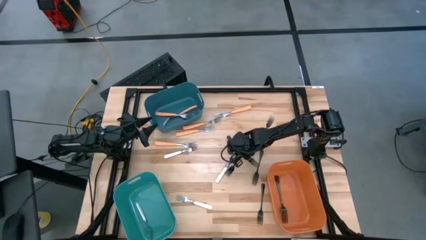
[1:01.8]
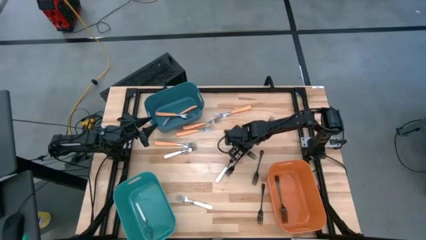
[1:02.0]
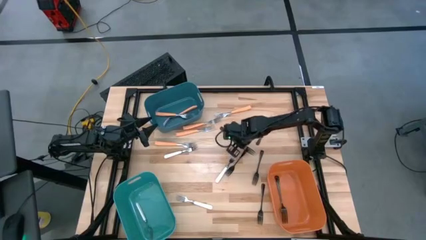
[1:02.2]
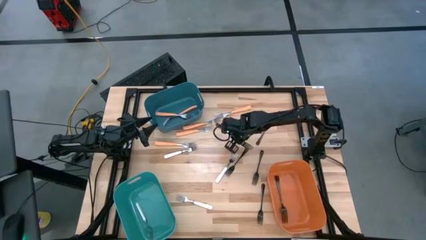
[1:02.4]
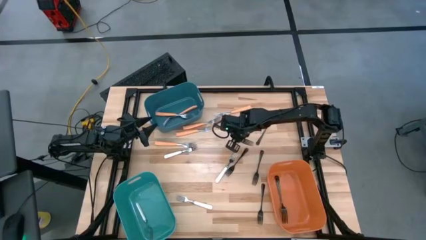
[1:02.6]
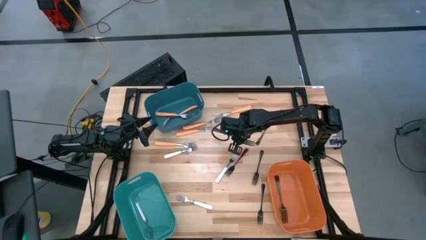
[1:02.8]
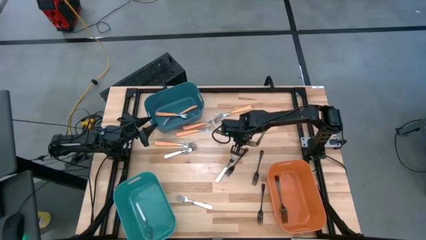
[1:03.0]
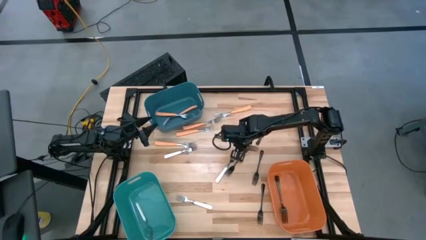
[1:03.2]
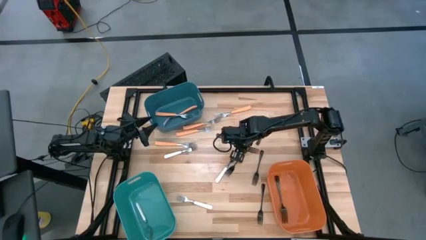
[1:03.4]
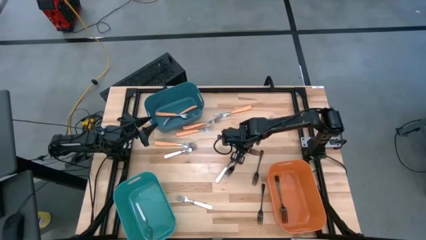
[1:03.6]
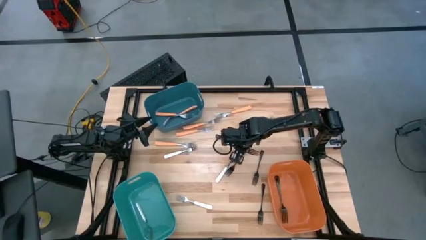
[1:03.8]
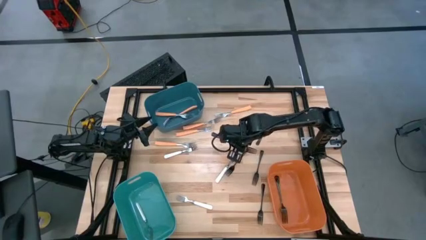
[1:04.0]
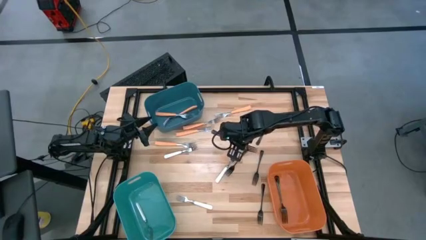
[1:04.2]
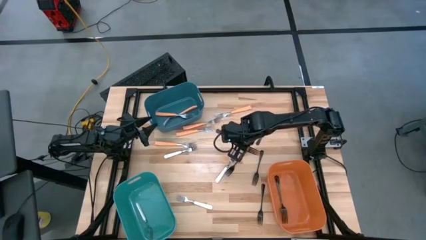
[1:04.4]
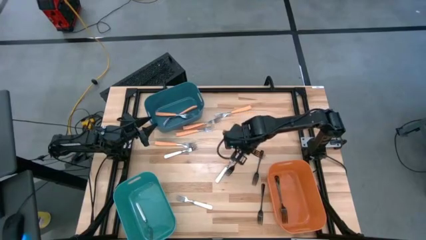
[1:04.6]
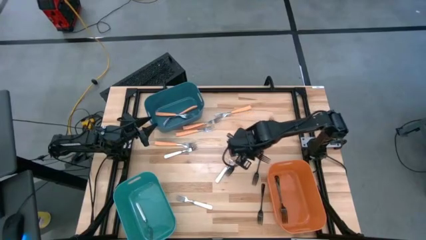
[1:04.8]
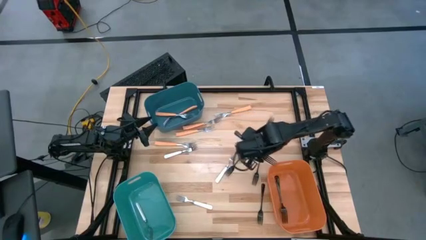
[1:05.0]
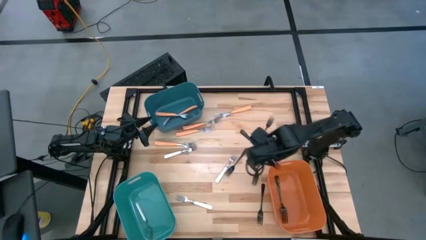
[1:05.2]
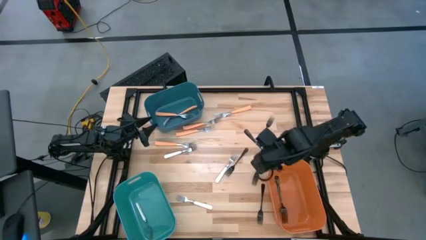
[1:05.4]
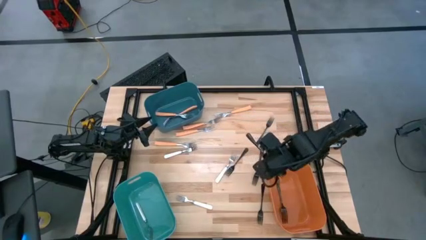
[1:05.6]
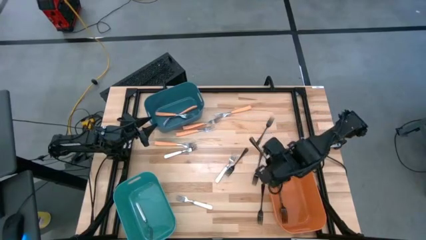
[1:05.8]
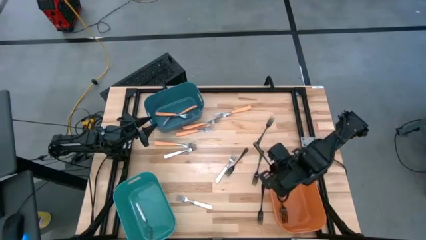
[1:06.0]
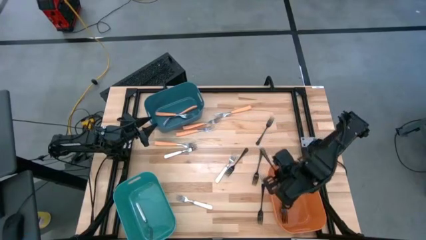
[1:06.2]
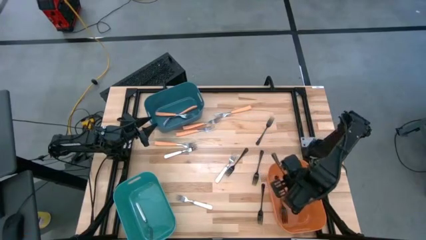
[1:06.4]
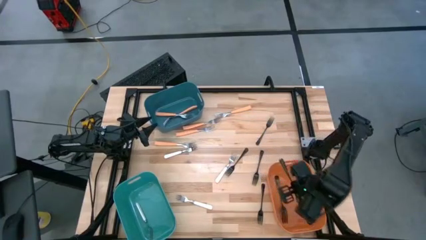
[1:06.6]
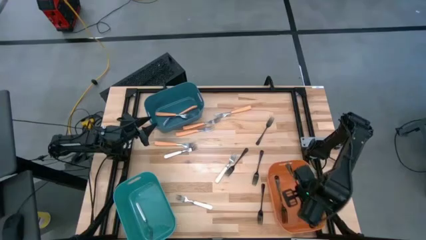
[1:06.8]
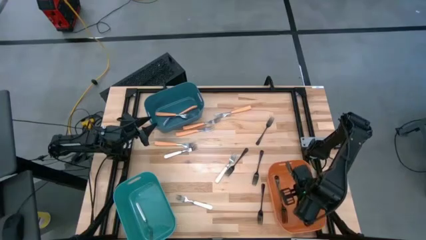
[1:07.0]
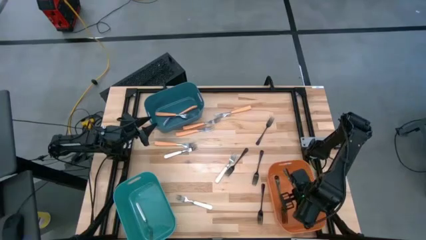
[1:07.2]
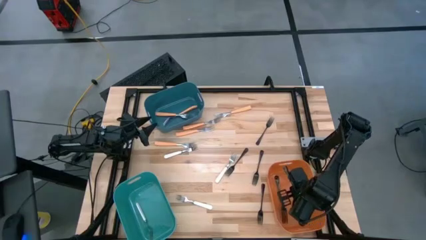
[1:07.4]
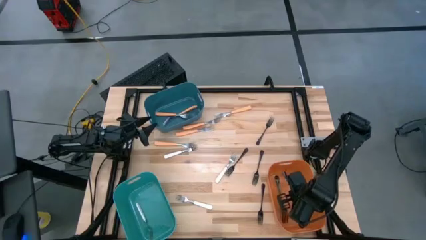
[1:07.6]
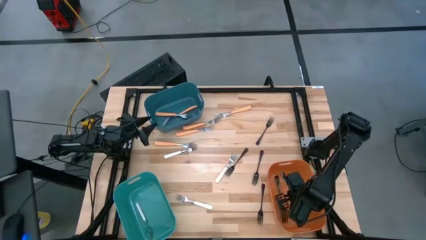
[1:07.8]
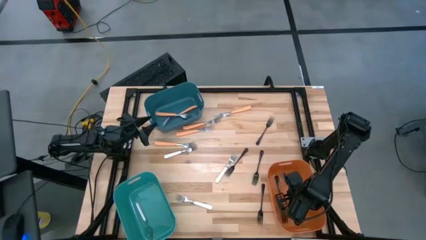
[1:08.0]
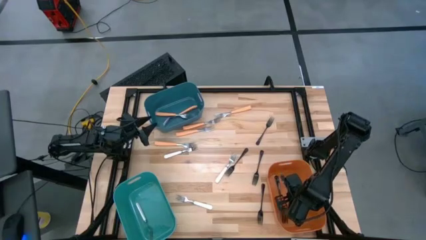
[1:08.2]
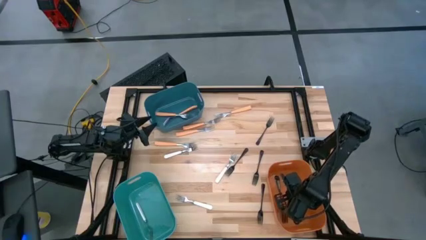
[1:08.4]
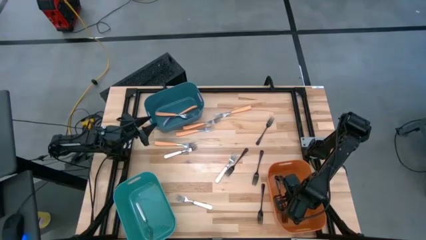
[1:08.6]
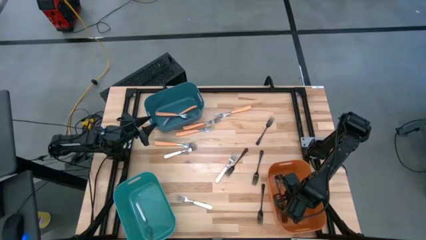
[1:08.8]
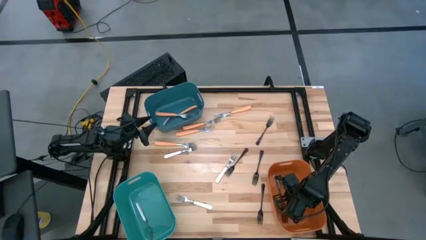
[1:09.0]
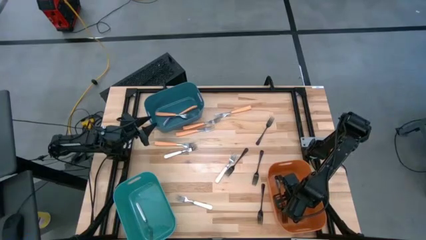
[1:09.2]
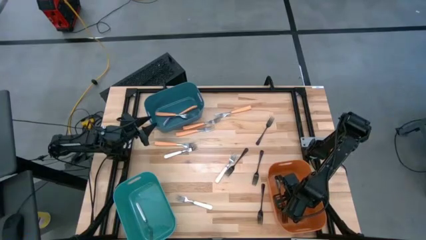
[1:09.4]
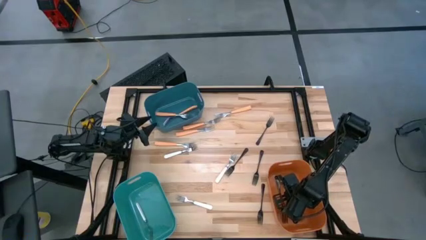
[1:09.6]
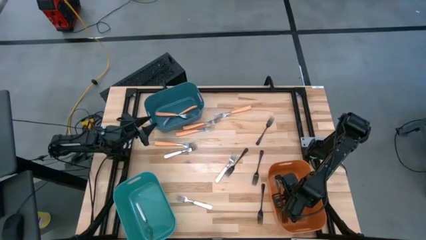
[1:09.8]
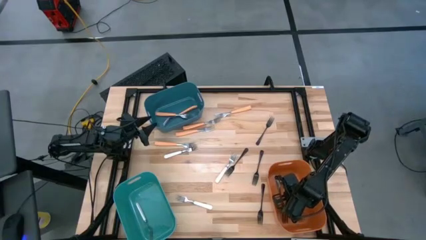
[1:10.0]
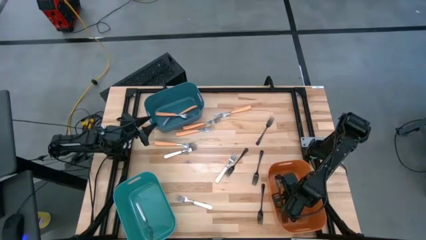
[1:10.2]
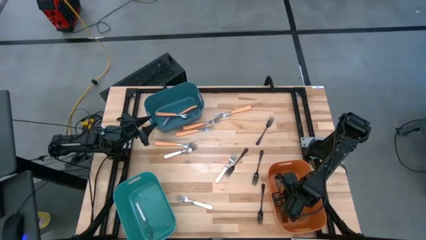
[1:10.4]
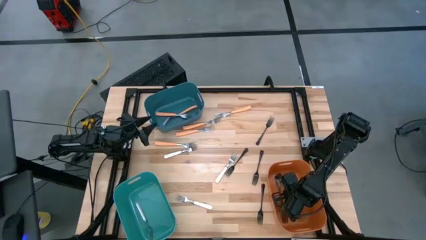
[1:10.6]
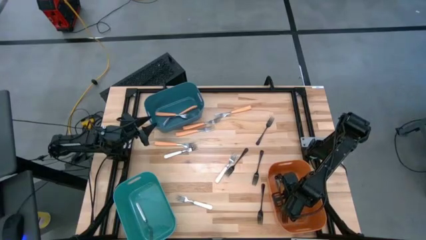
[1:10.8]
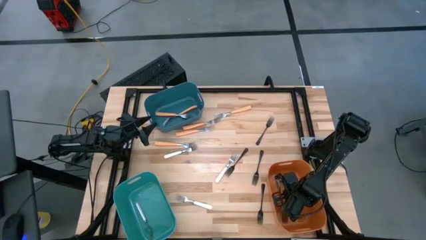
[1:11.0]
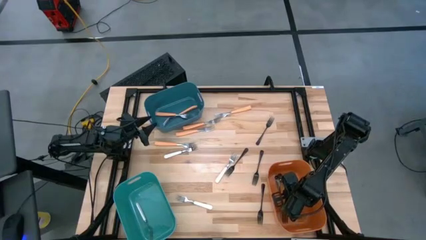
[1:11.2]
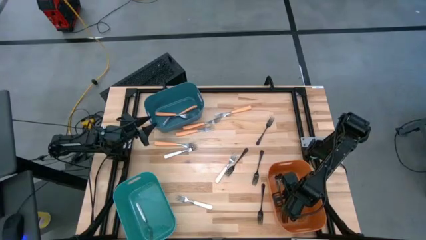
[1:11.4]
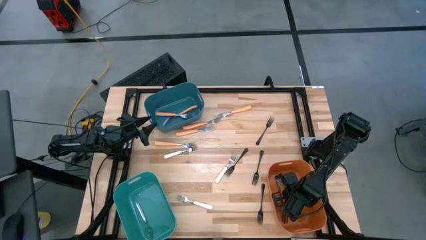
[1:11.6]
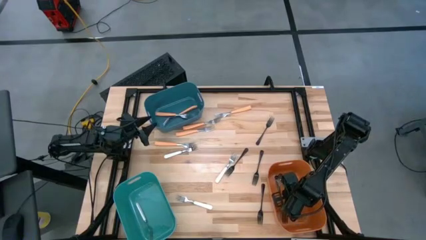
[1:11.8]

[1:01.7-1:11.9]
Task: Sort silverware by color (type)
Put the black fork into the orange bin

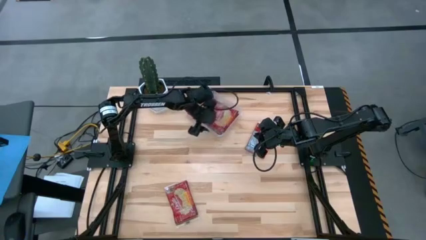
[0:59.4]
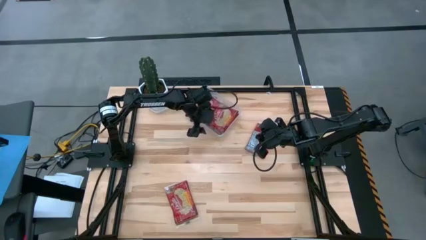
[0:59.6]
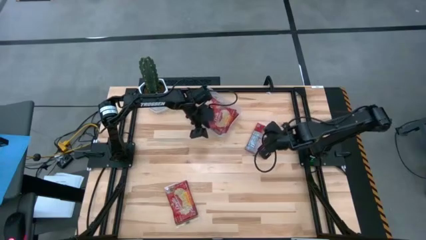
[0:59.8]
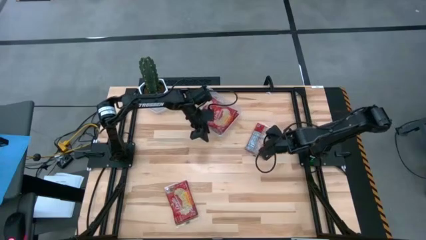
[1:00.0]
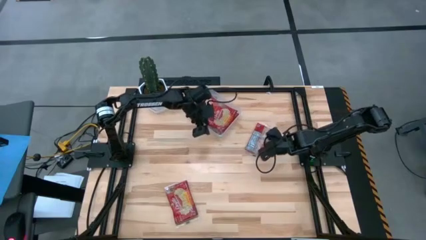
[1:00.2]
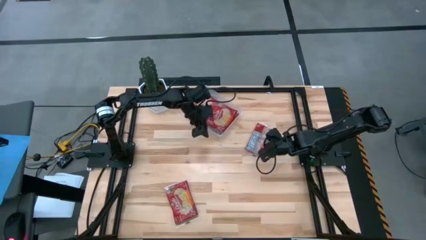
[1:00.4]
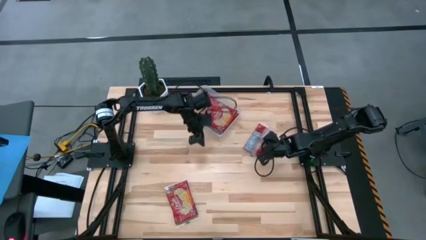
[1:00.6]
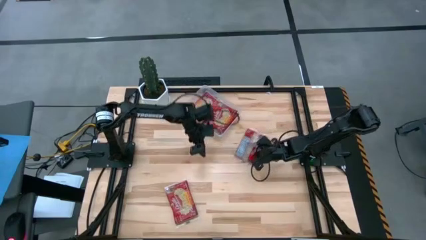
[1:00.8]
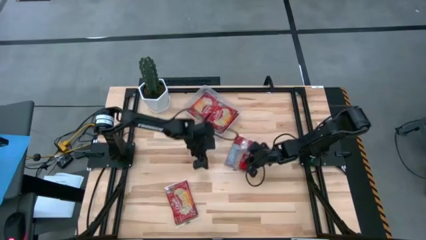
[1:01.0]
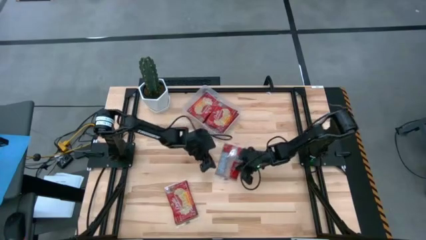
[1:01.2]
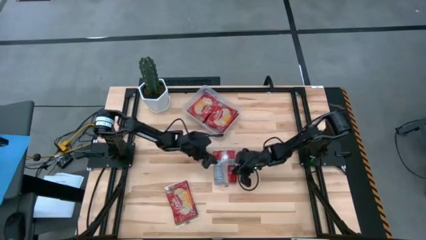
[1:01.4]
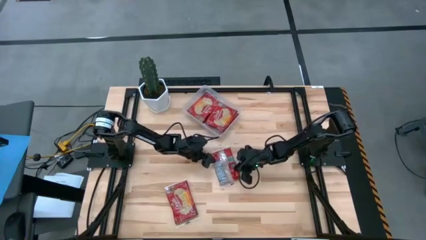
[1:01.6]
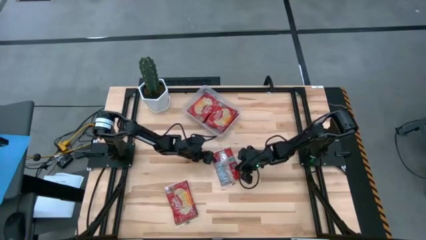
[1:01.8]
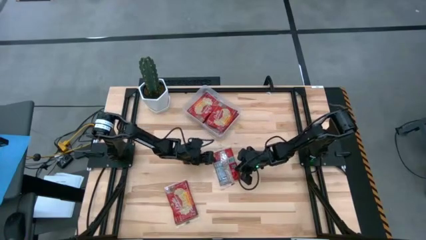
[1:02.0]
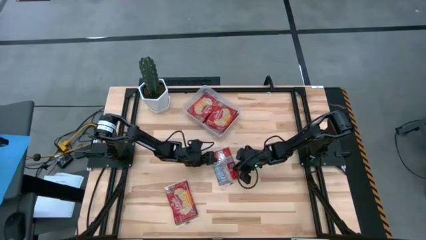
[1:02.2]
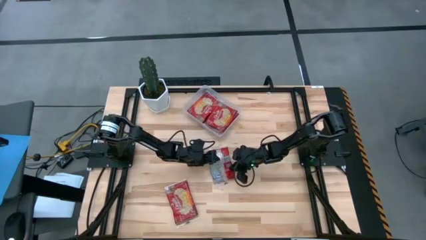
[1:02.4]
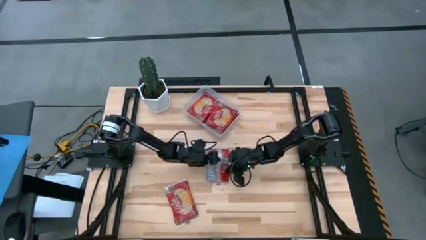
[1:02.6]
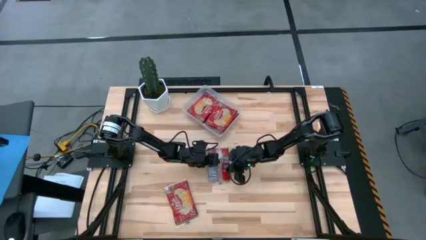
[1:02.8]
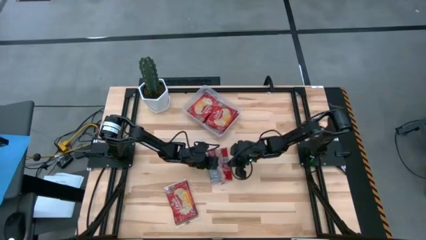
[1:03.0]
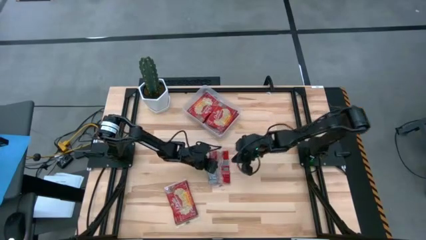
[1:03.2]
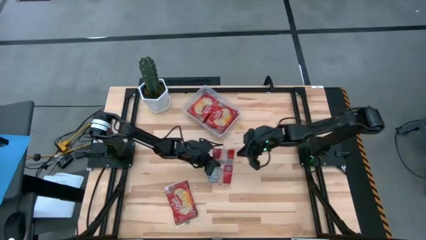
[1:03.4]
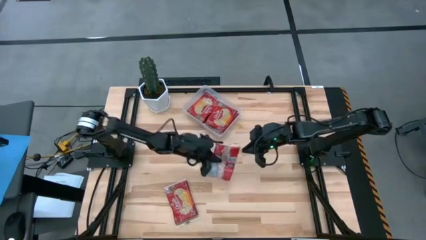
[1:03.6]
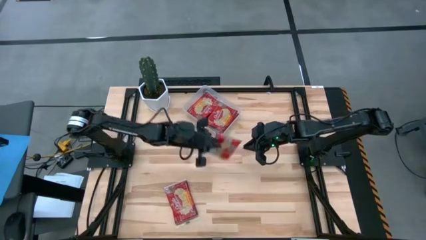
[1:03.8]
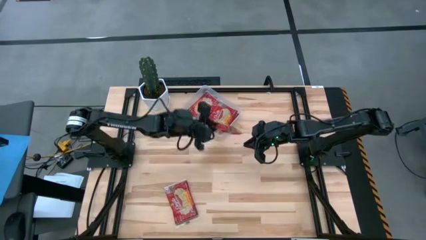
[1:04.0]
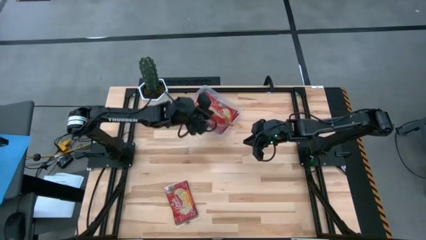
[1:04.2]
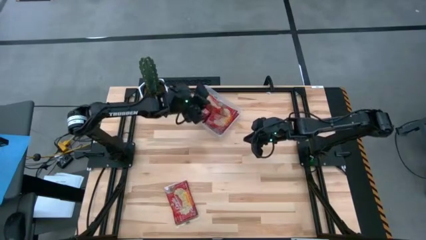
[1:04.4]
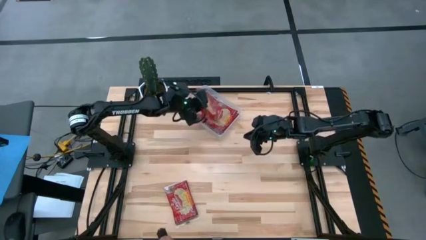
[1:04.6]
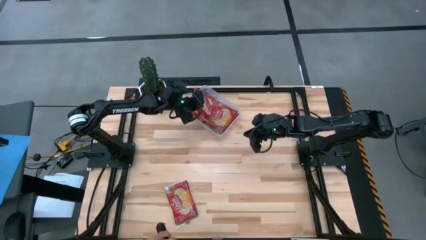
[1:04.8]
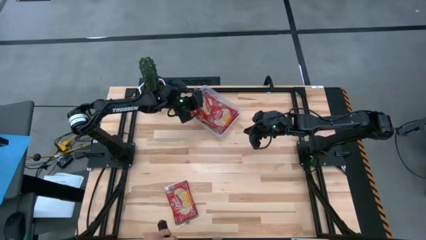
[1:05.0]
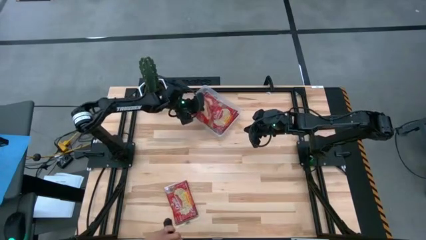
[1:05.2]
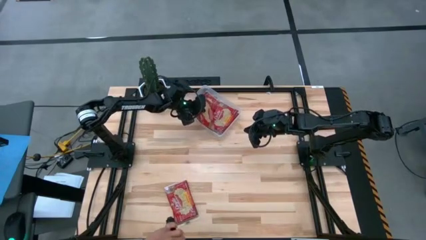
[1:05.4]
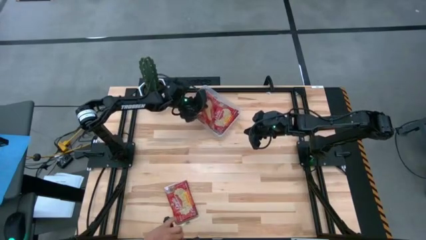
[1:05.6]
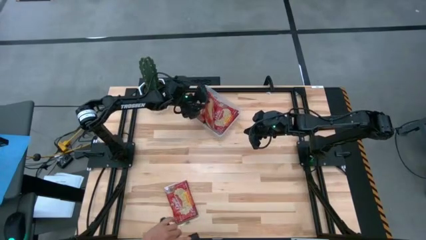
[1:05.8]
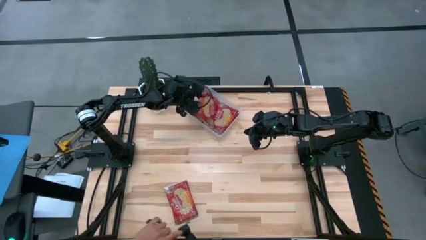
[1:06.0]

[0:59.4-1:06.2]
Task: Sort popcorn bags into baskets
Put the red popcorn bag into the transparent bin
